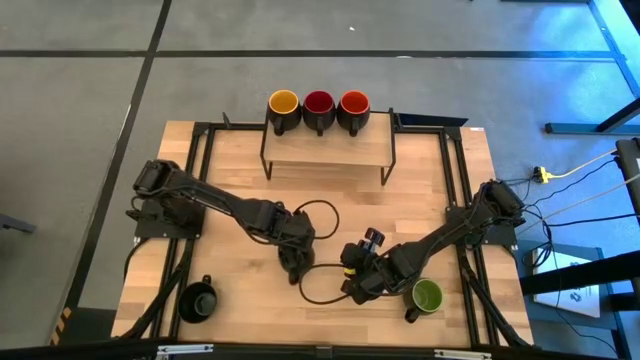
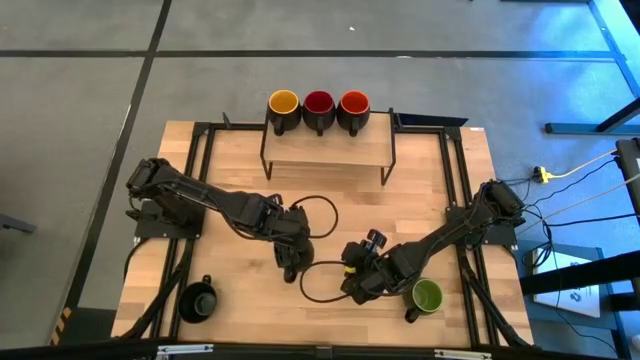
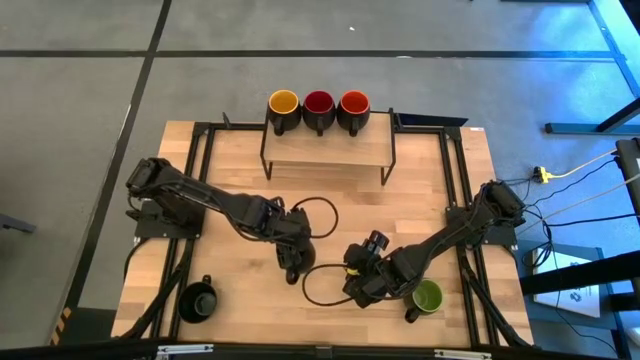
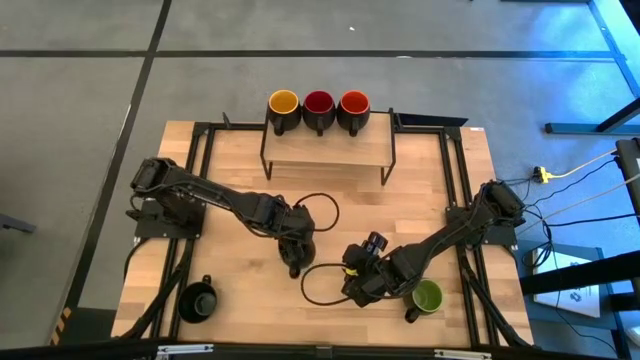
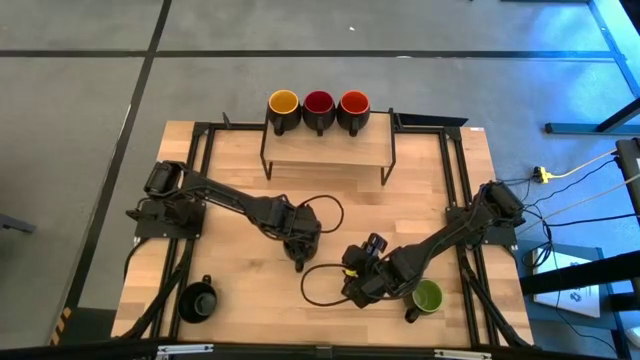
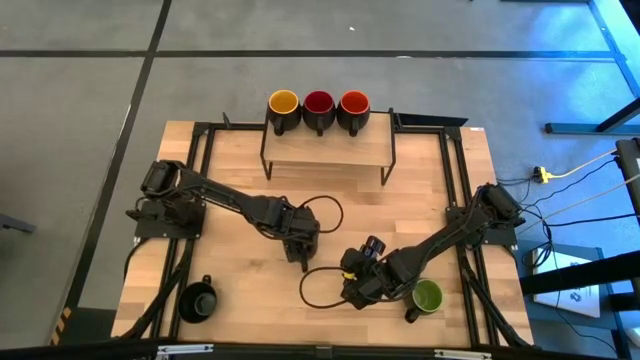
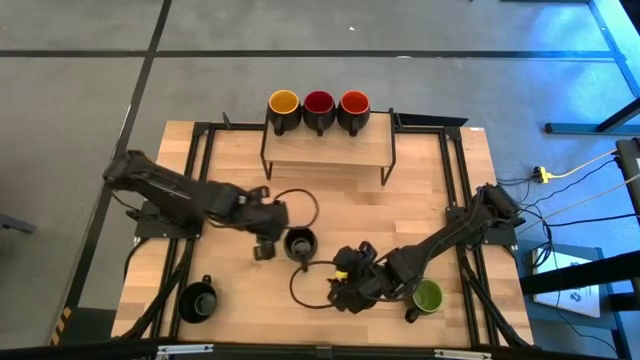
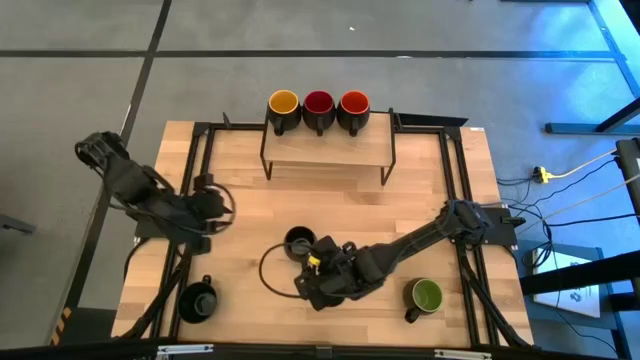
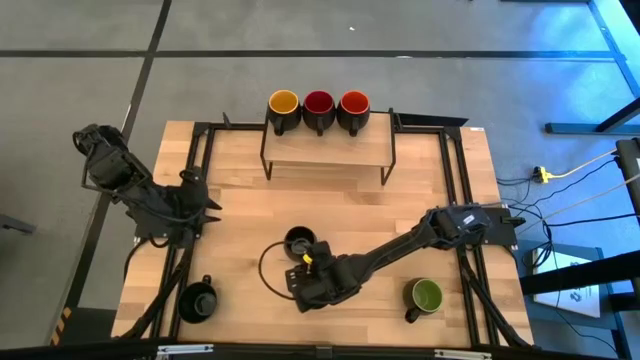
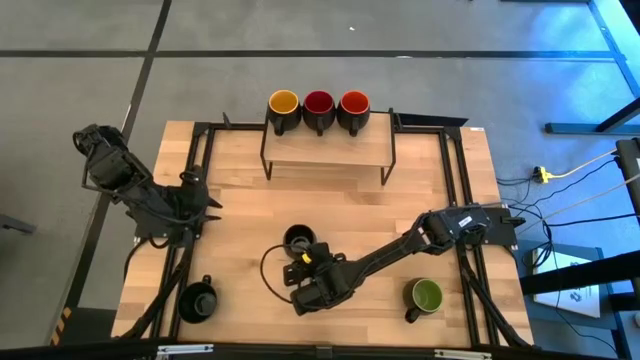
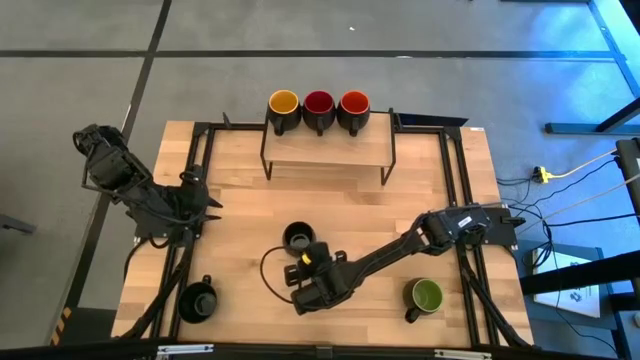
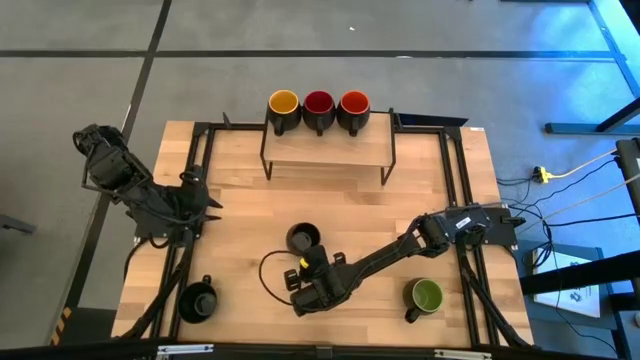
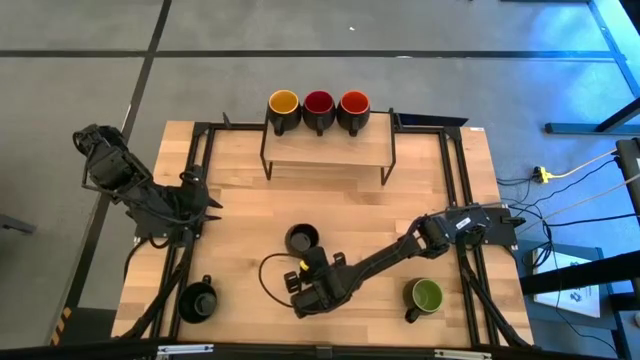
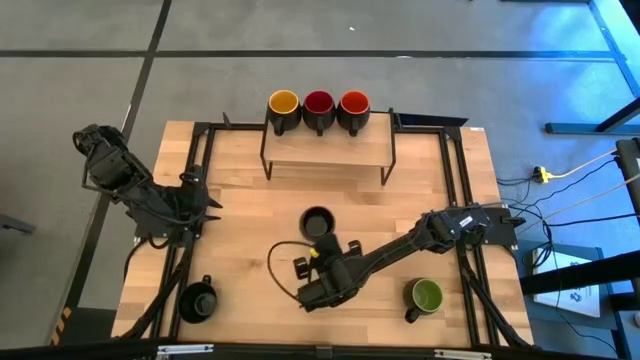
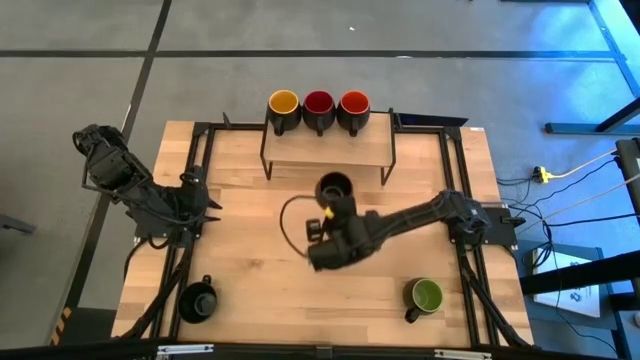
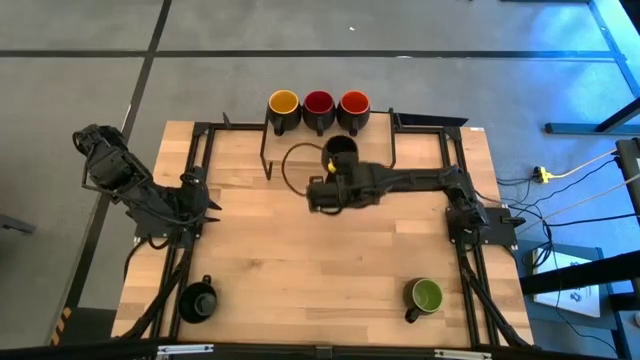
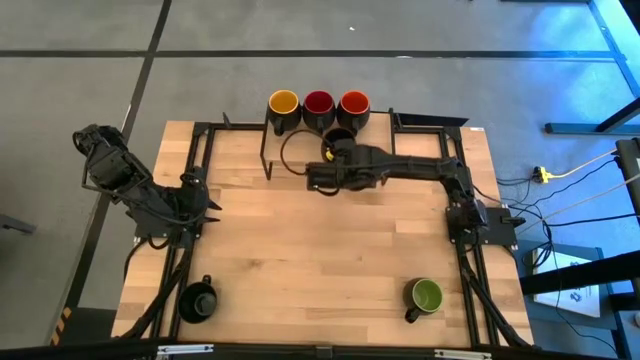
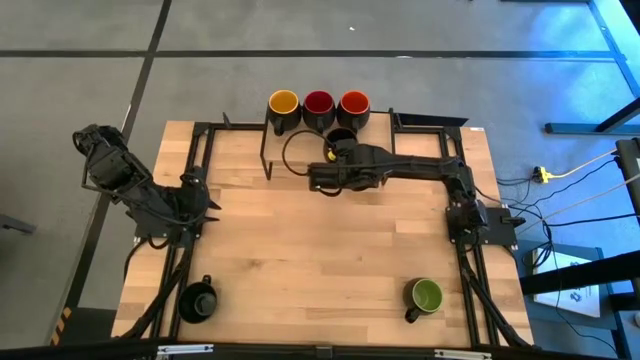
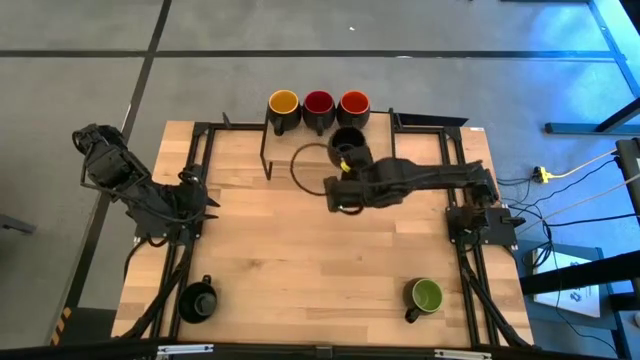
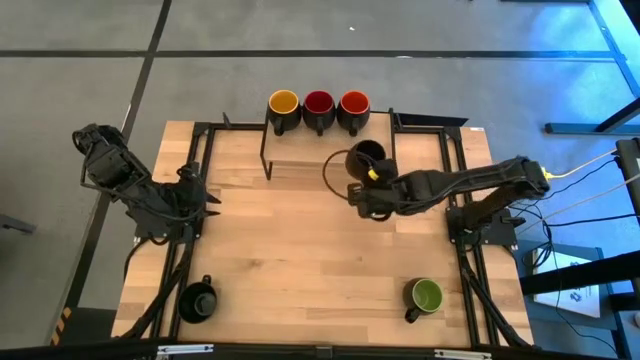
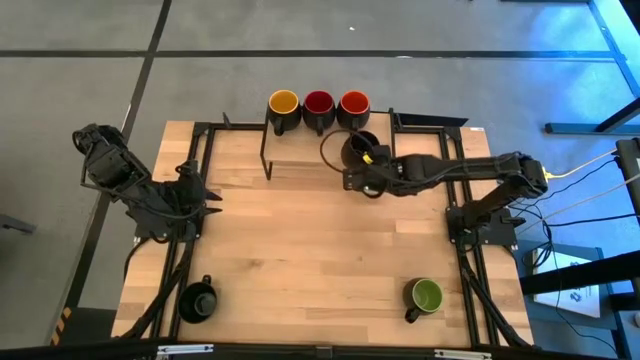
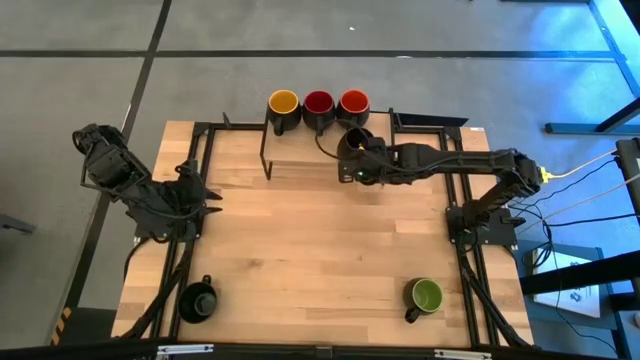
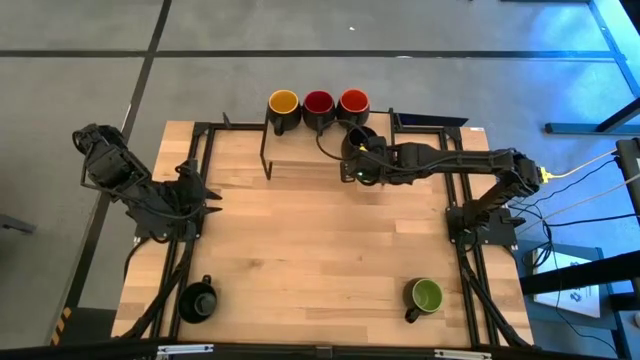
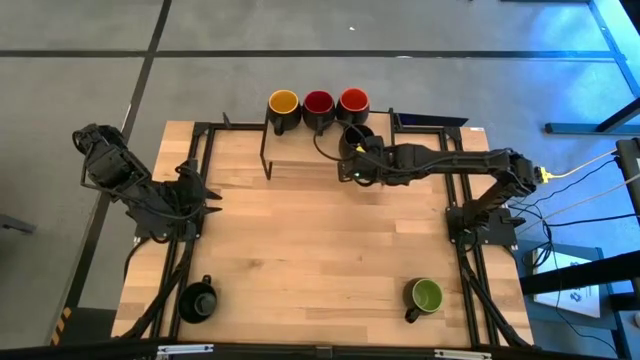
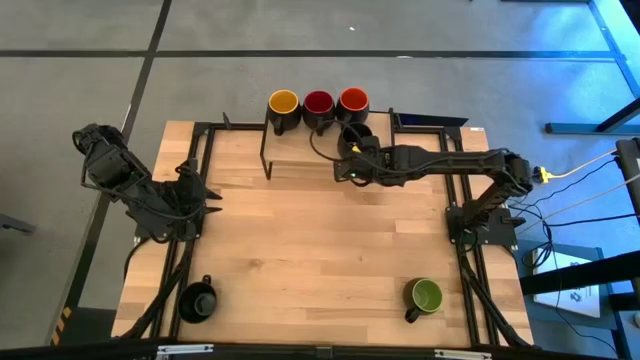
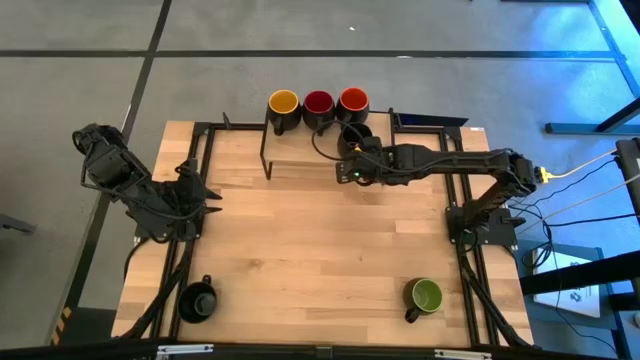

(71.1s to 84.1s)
Task: Place coffee mugs
Put the top black mug on the shelf

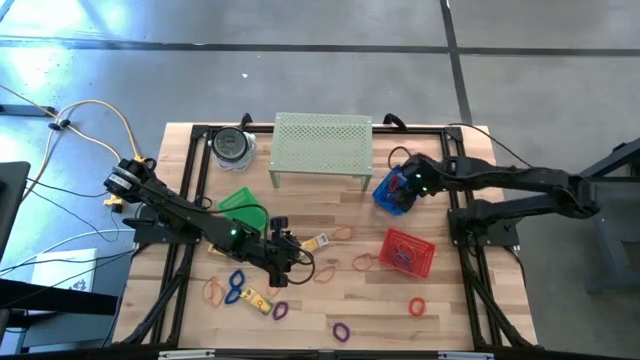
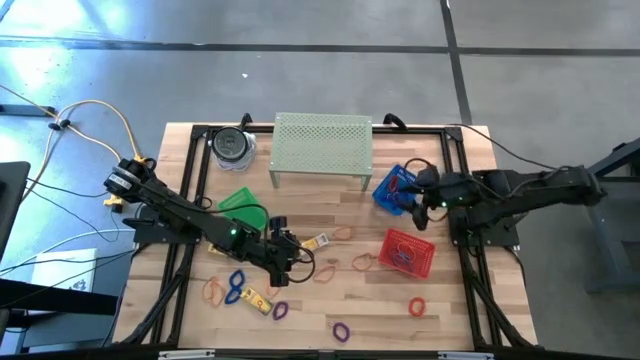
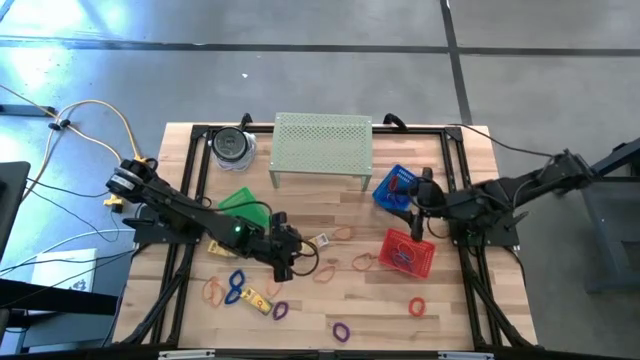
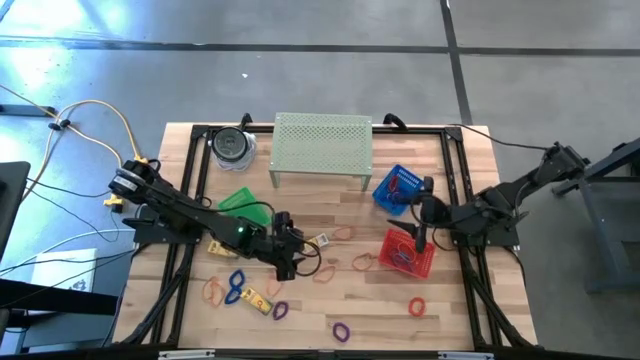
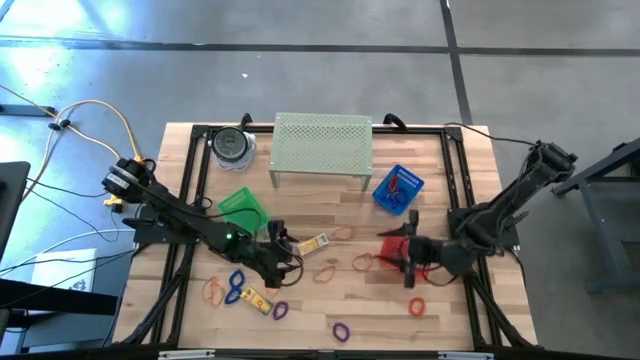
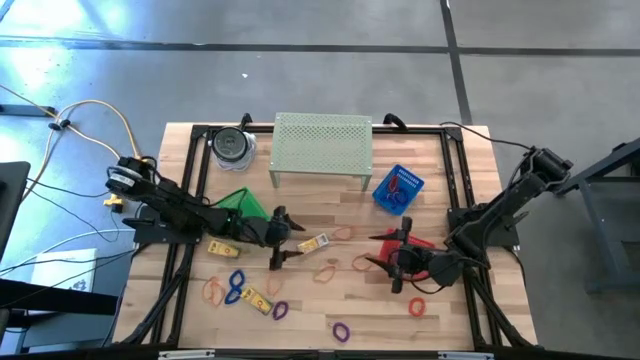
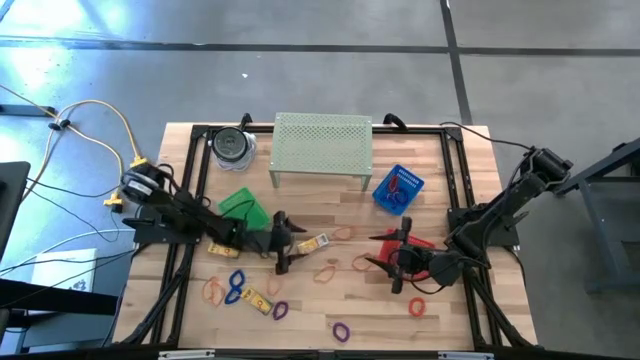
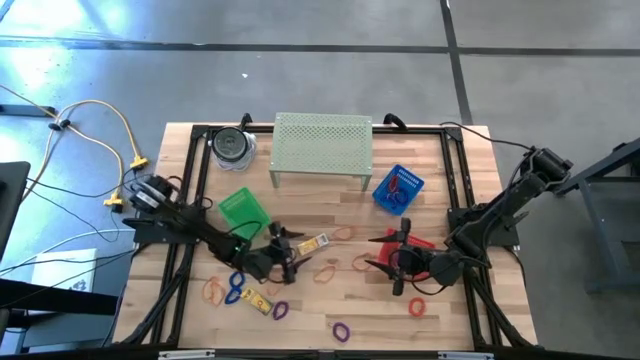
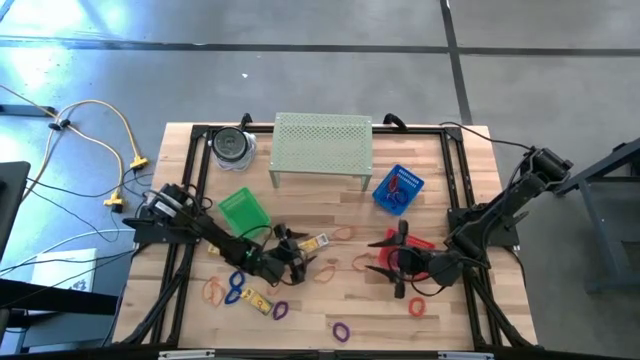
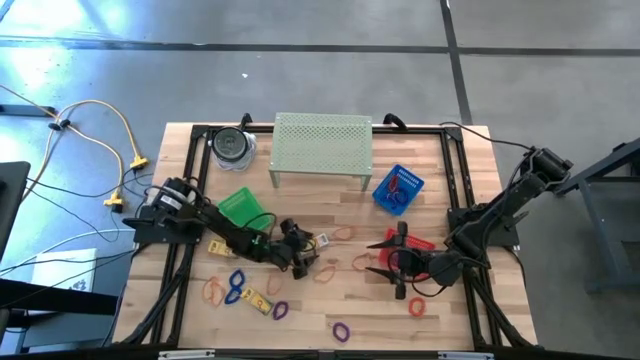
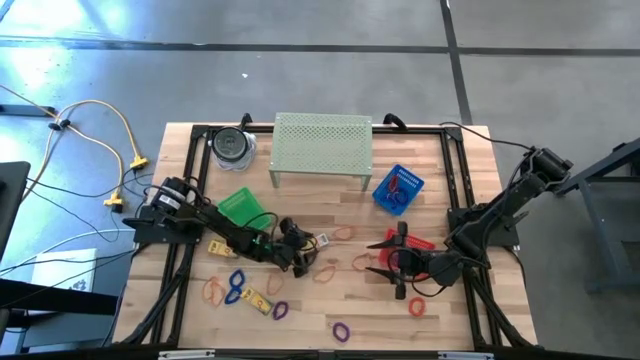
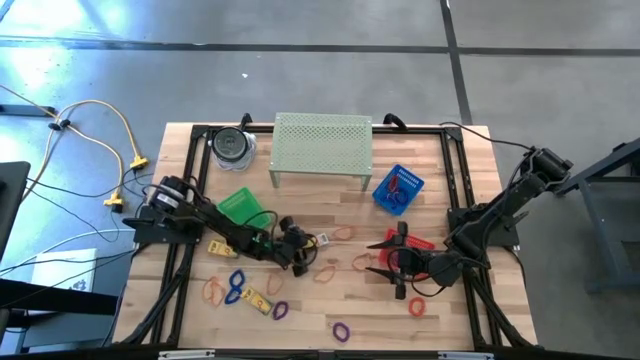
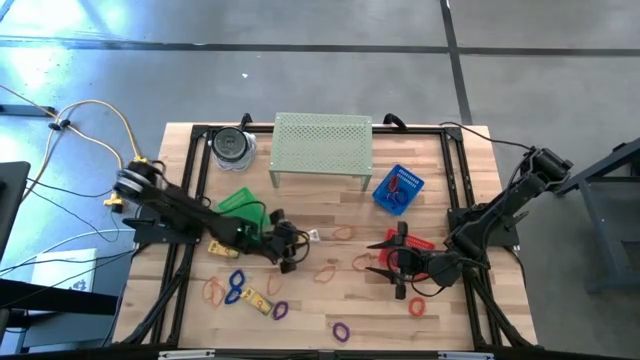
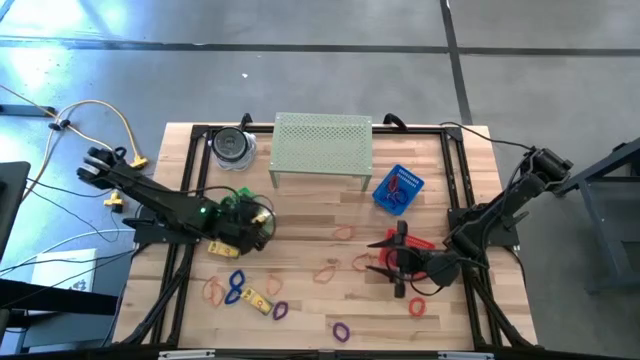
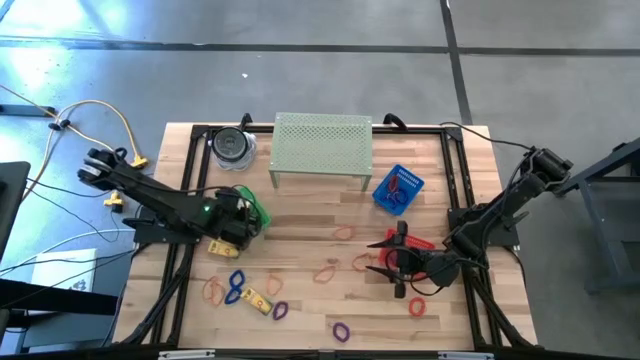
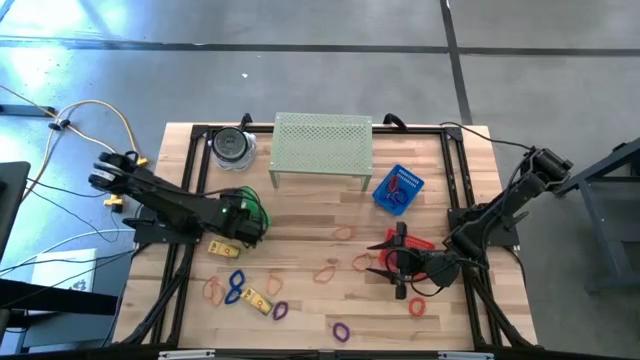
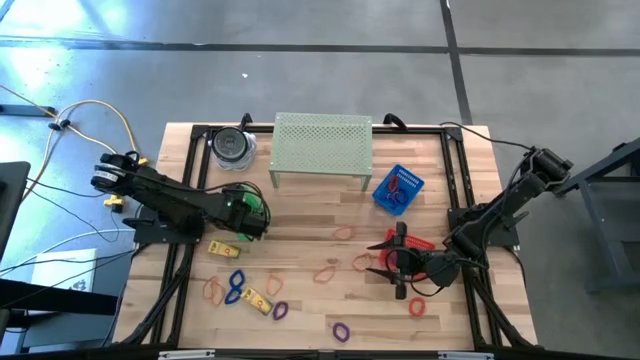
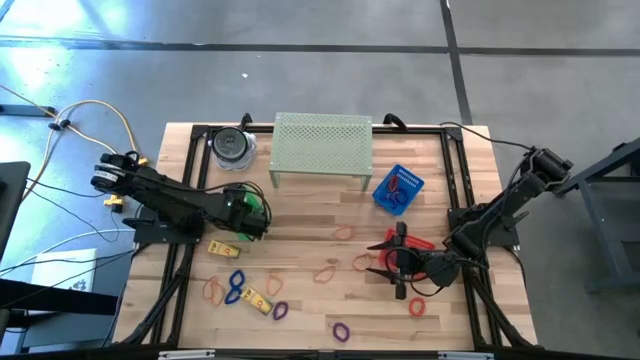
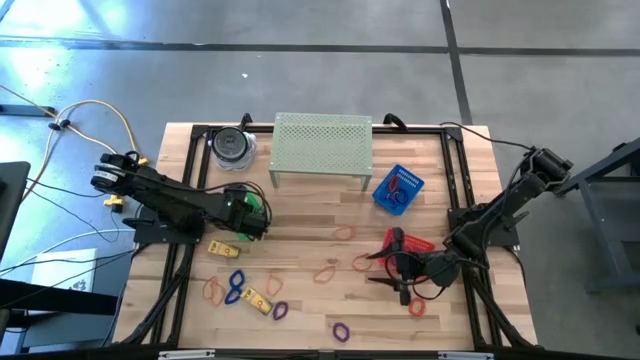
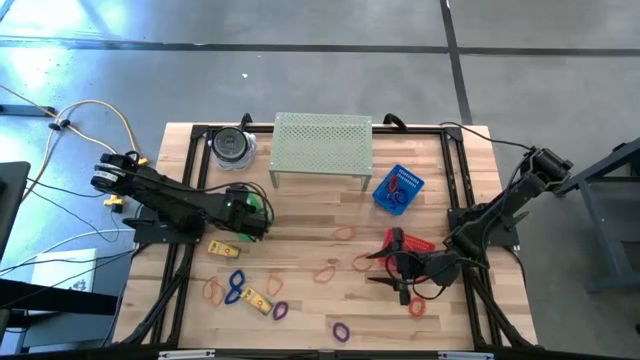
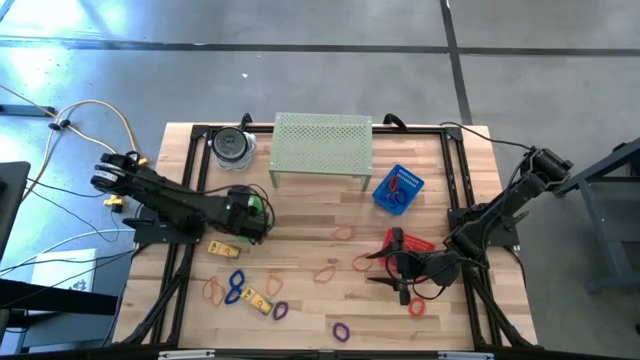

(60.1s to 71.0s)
Task: Pick & Place Office Desk Supplies
Put the crayon pack into the green basket
